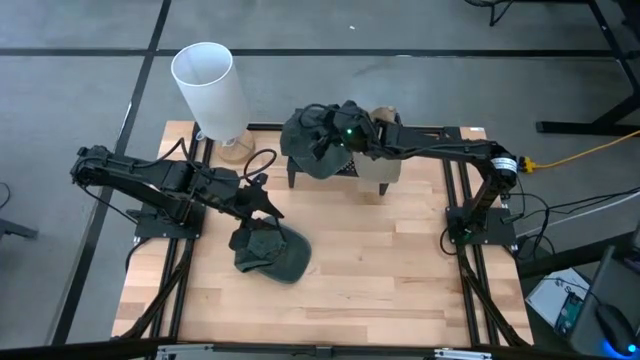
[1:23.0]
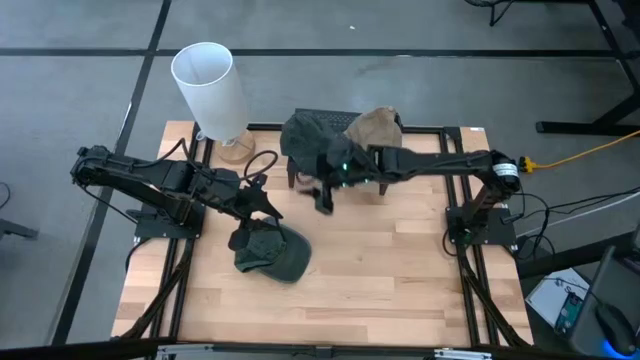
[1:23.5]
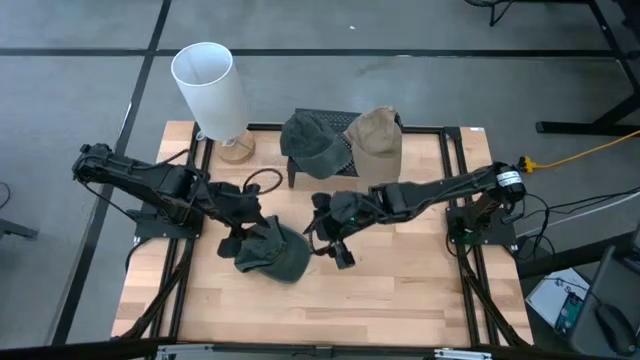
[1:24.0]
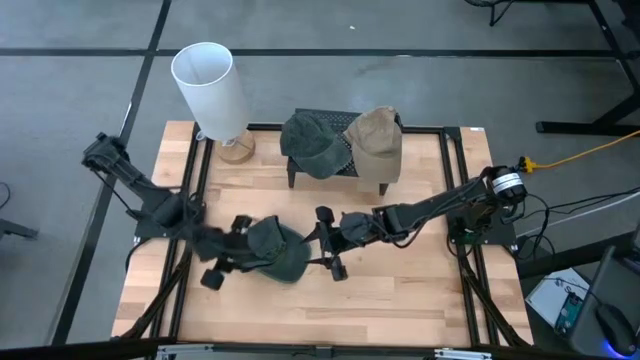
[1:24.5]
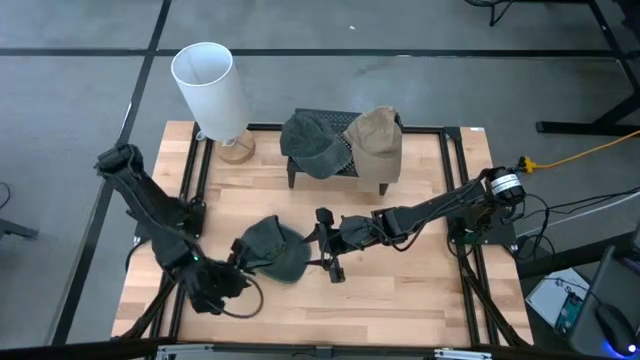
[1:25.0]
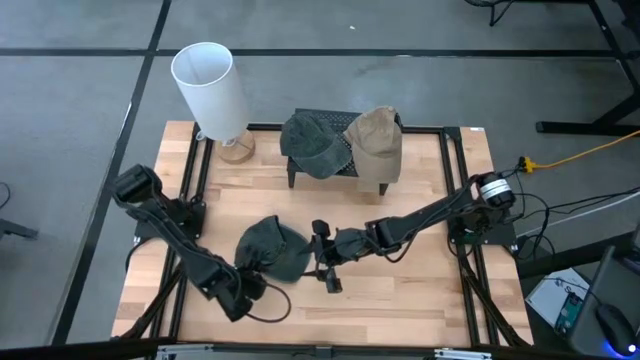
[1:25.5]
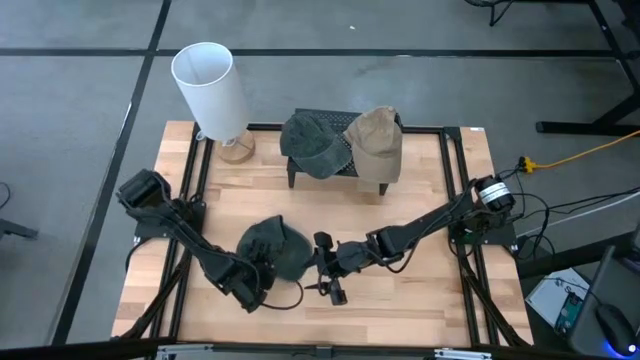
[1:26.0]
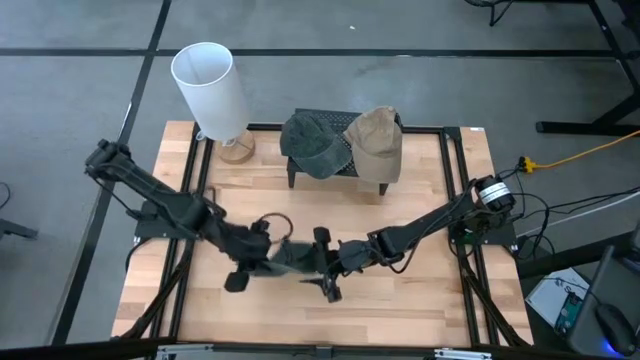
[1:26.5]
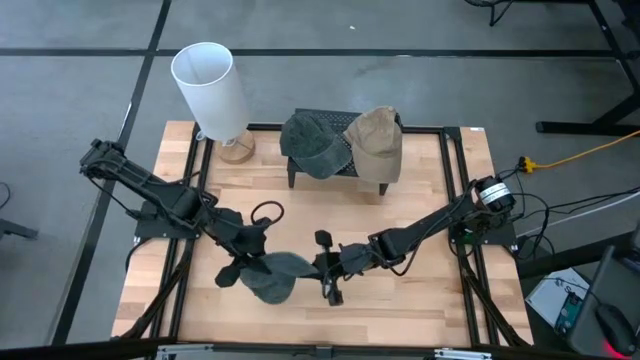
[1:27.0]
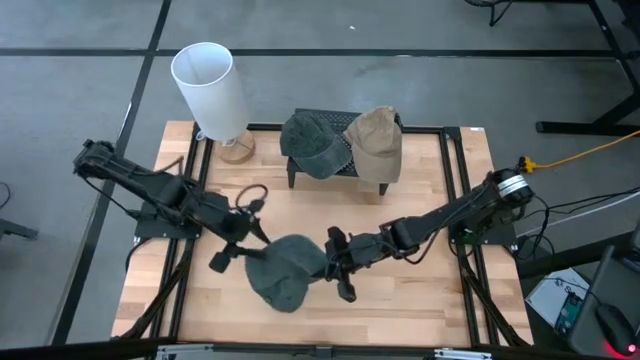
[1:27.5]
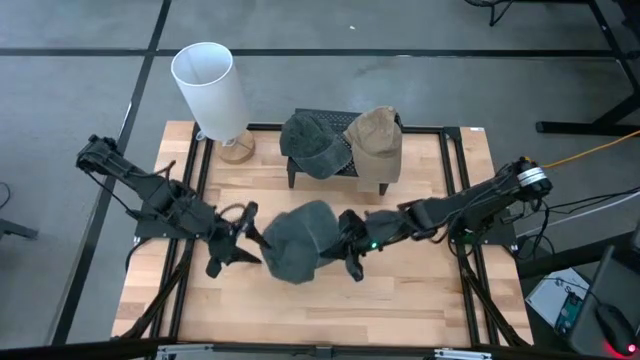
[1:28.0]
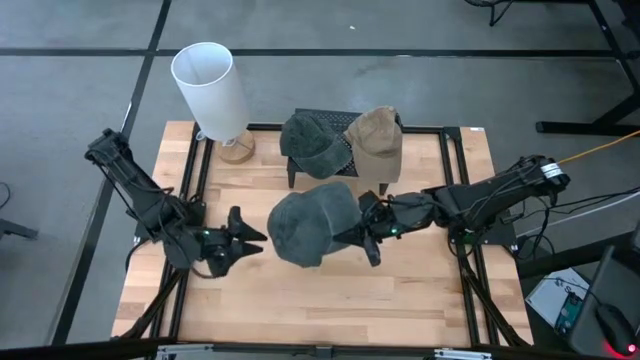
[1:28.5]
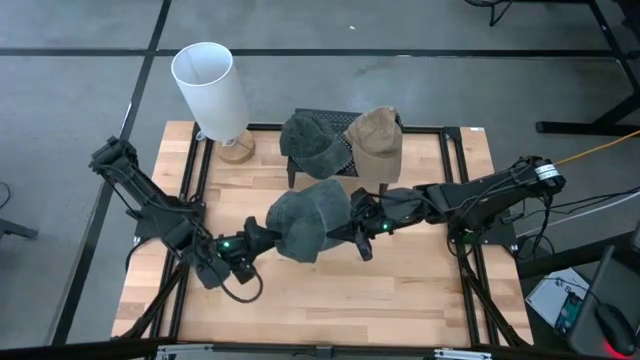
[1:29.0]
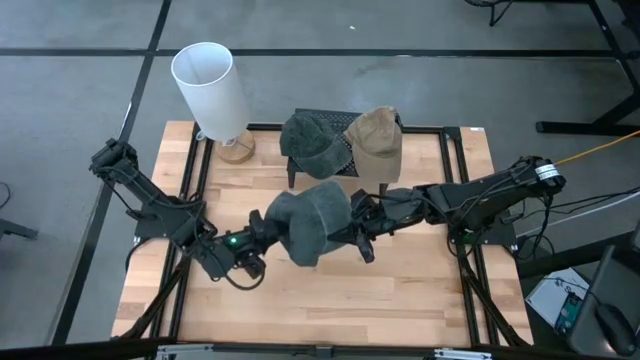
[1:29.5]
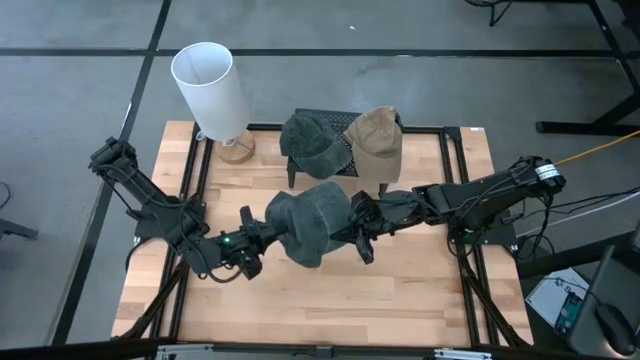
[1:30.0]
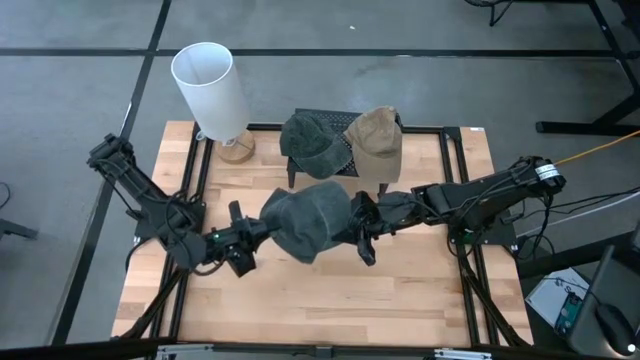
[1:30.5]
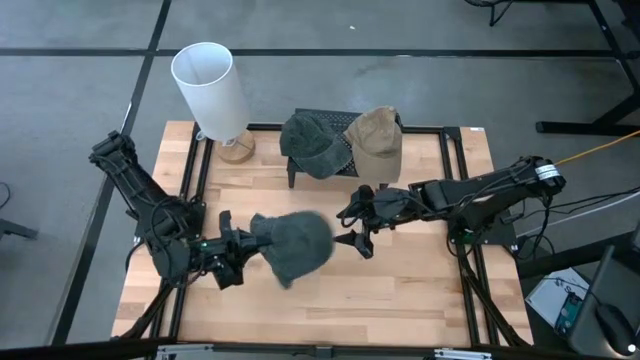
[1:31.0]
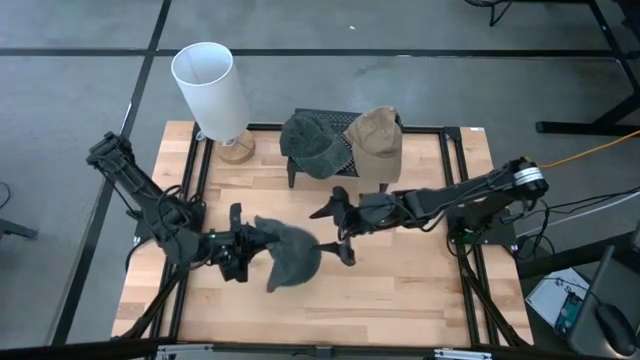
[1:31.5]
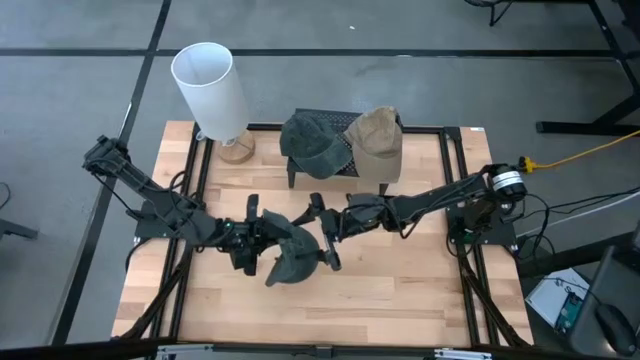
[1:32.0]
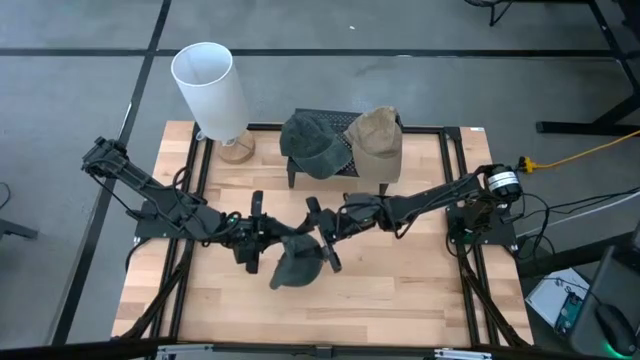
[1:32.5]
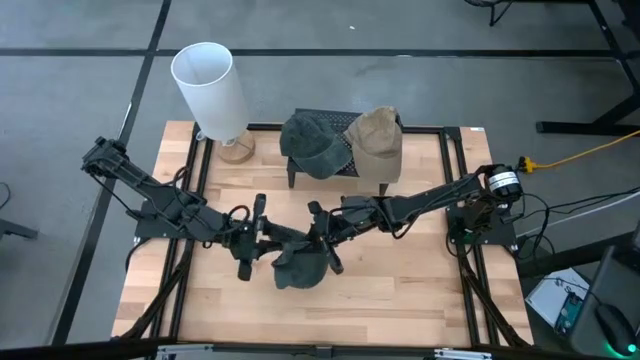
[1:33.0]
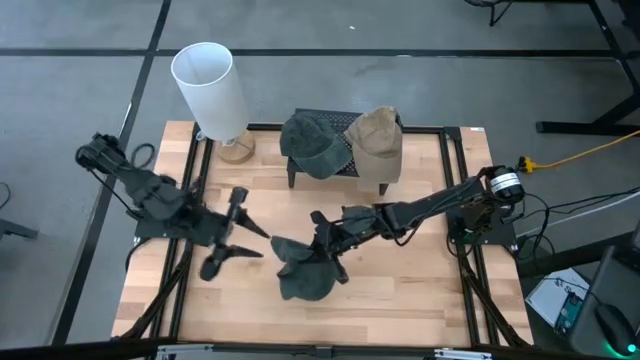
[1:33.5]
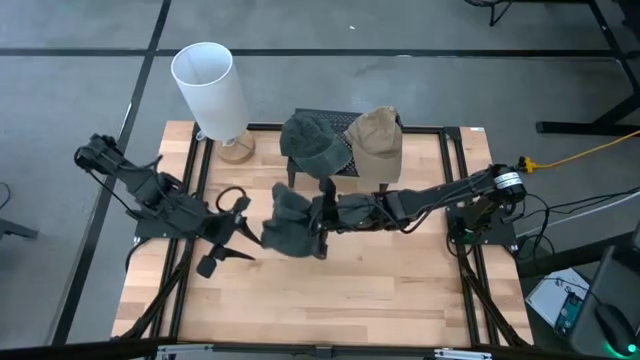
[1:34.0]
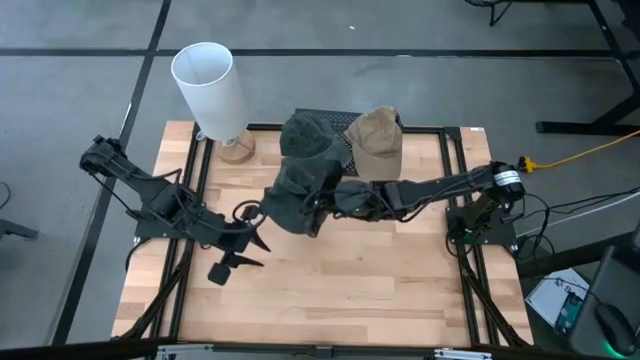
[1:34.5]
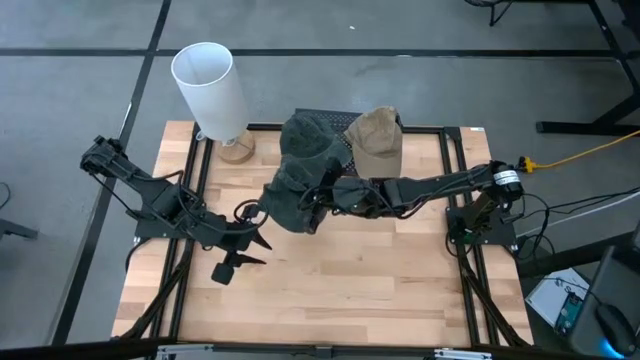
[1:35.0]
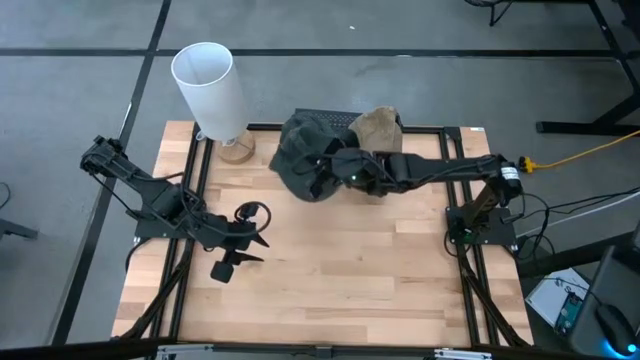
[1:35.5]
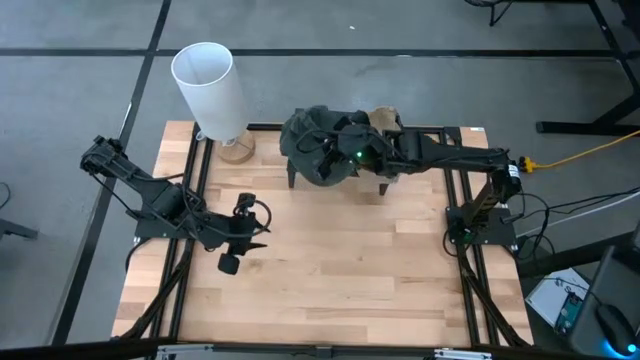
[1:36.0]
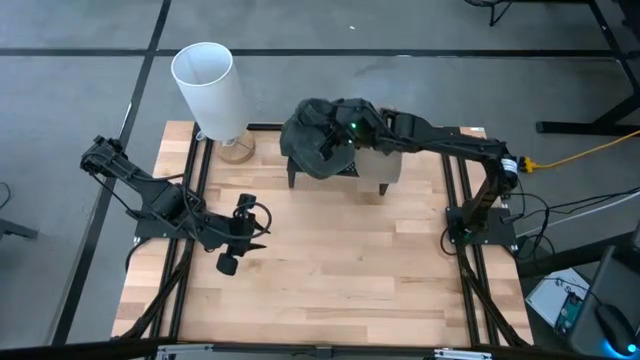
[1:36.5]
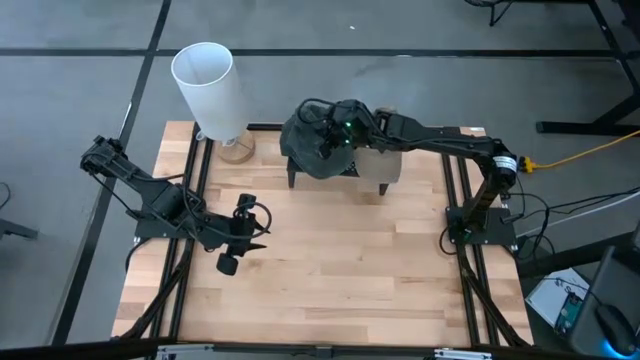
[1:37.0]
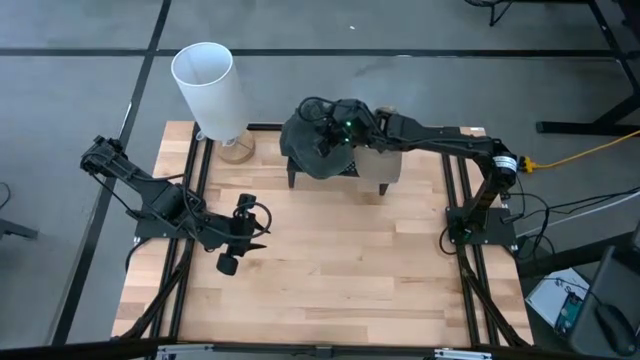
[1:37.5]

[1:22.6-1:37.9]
Task: Pick & Place hat
Put the black cap on the shelf

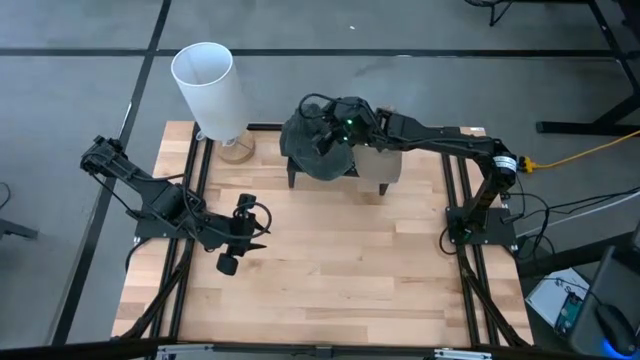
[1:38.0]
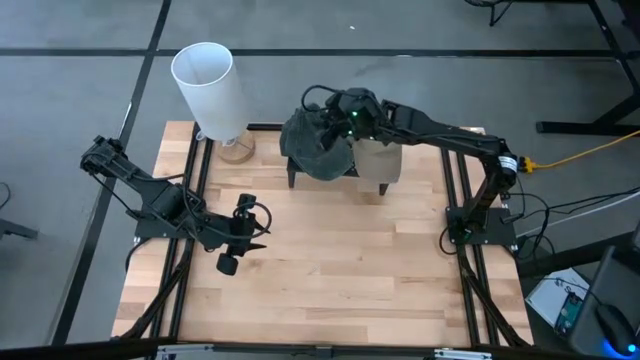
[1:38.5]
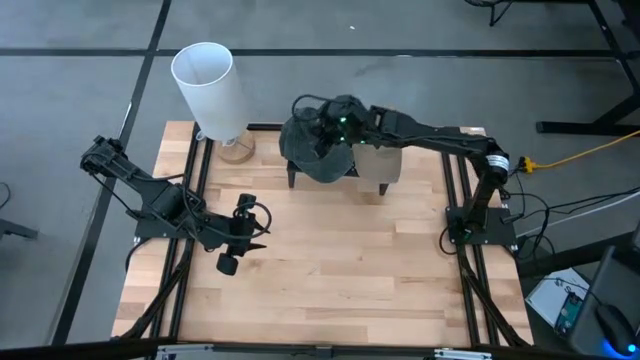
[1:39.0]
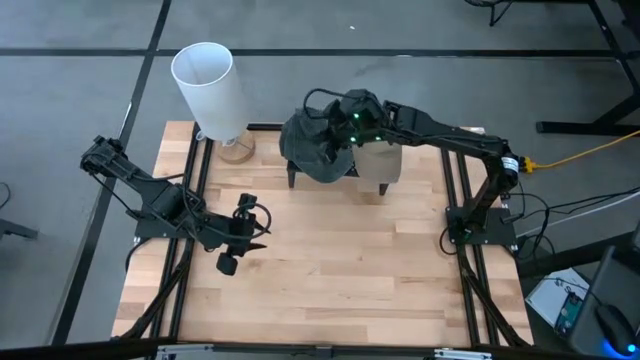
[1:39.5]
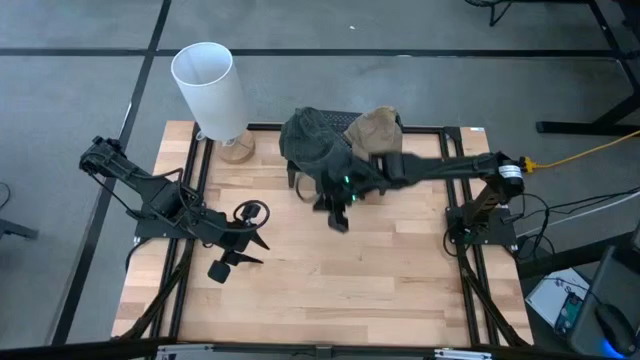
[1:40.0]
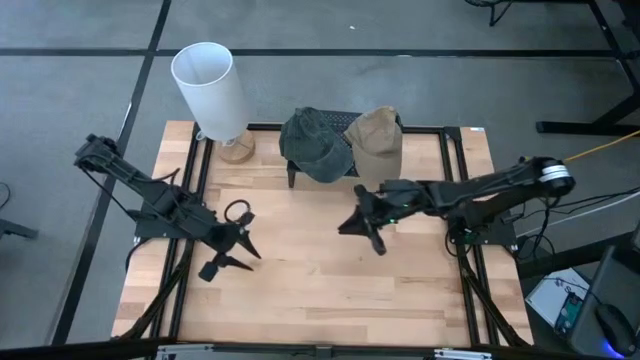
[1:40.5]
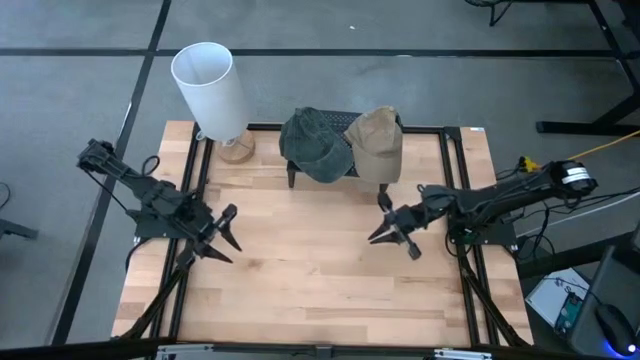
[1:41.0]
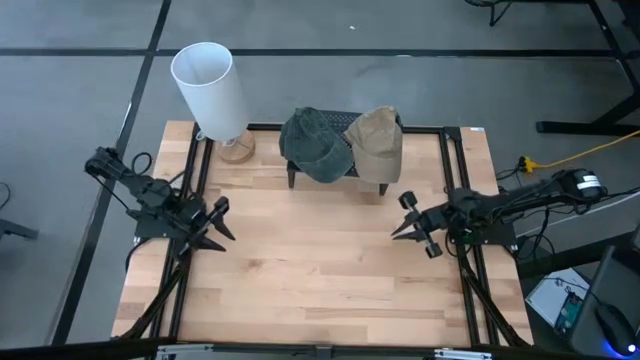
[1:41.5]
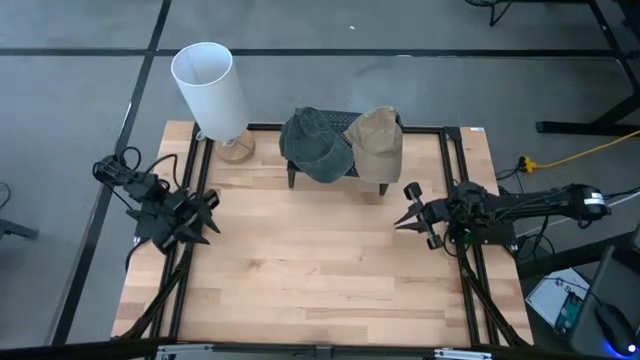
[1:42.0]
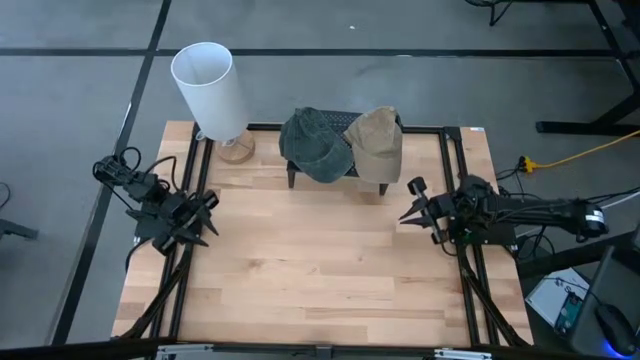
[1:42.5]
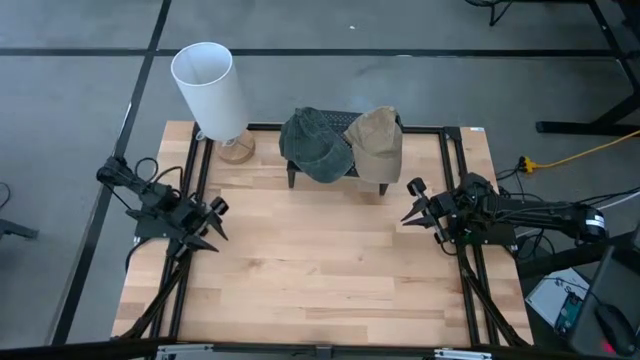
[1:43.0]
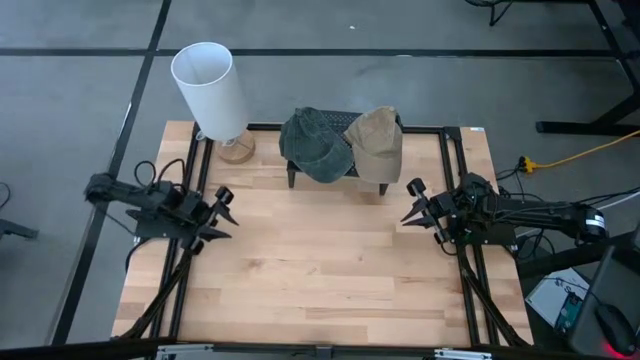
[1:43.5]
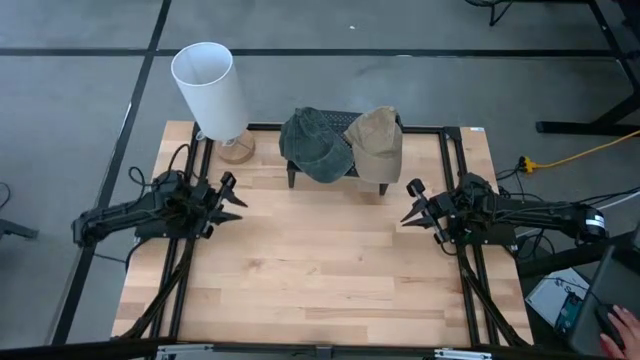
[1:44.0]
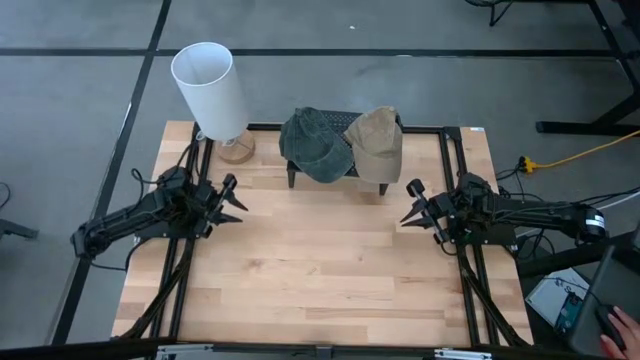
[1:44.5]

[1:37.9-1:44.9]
Return to Home Position
